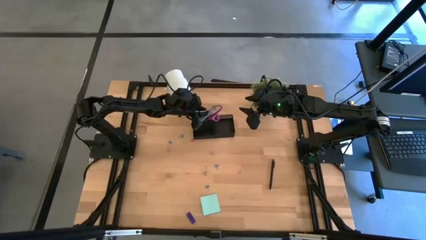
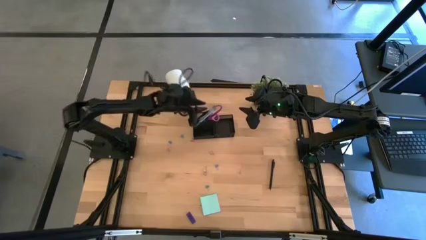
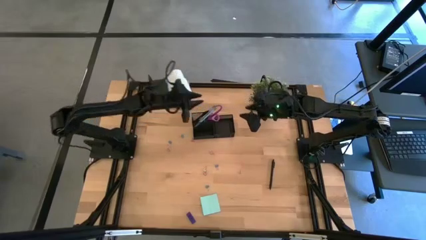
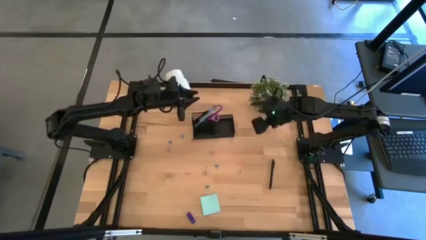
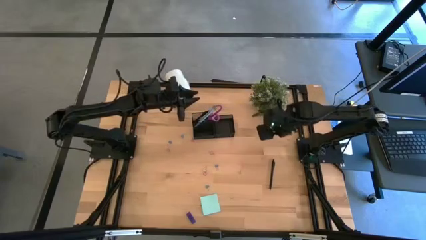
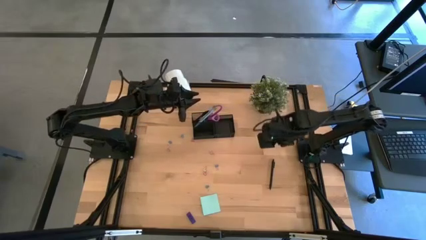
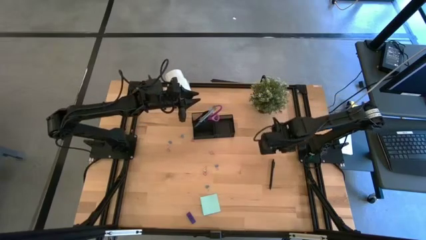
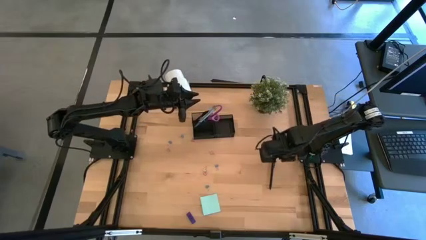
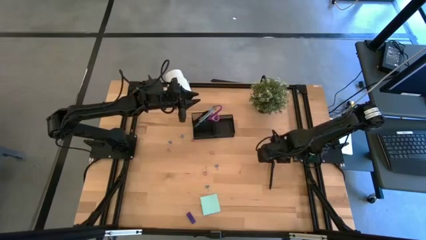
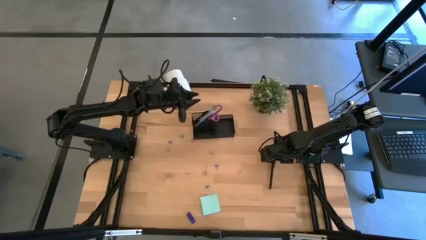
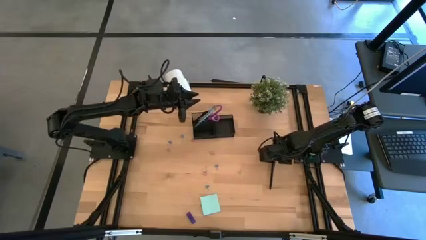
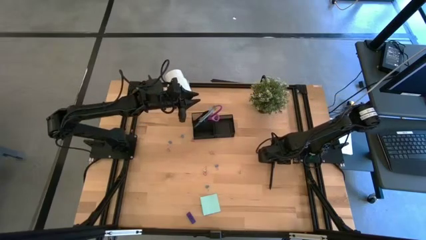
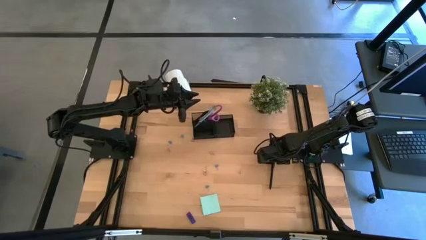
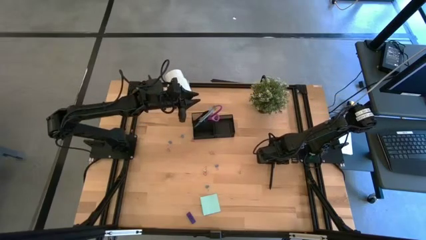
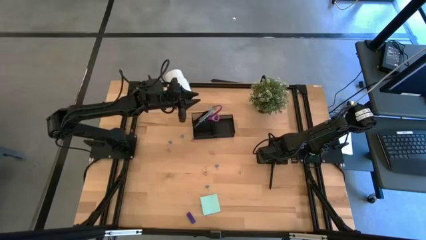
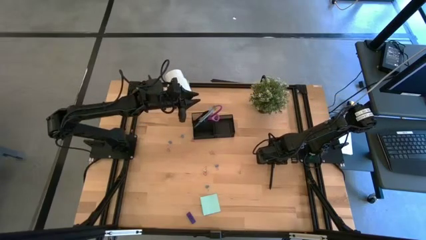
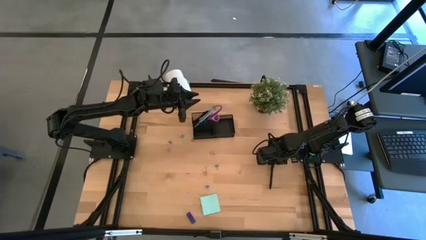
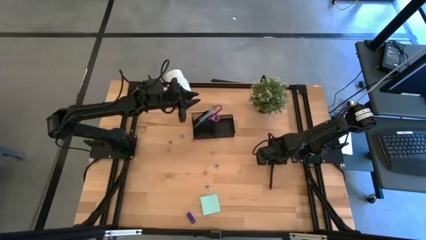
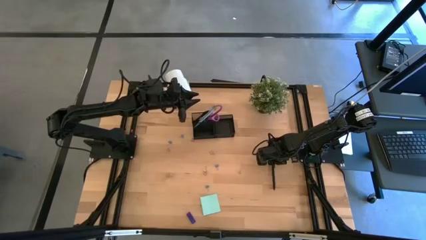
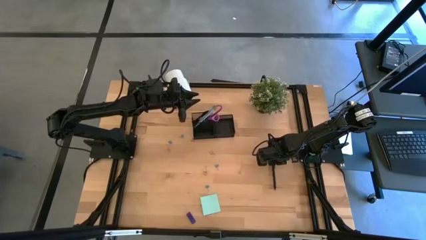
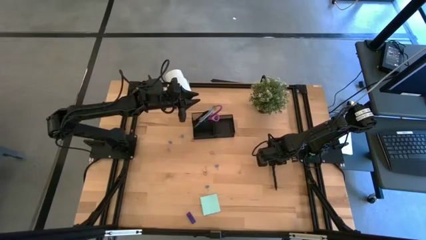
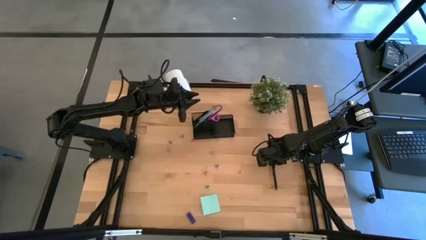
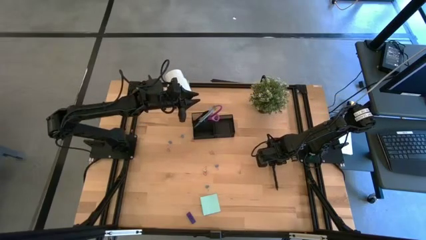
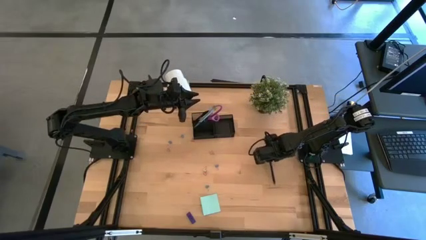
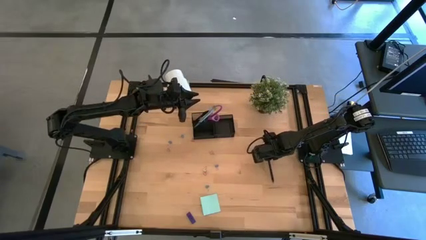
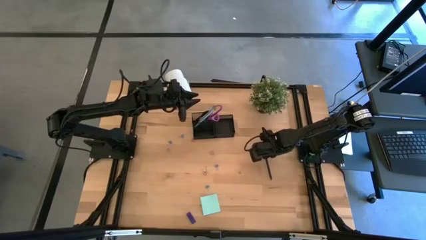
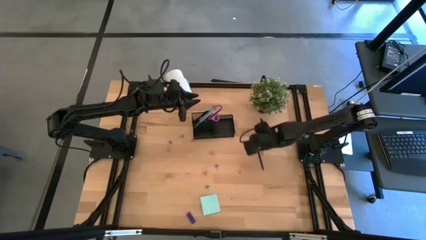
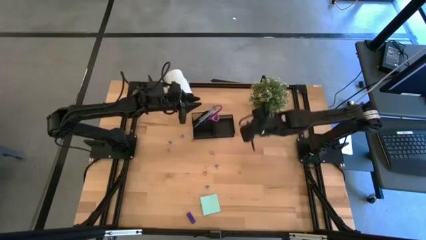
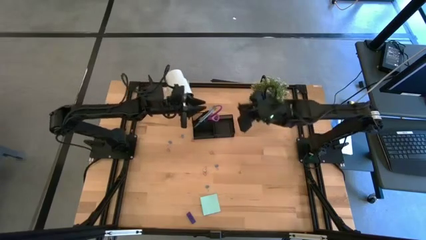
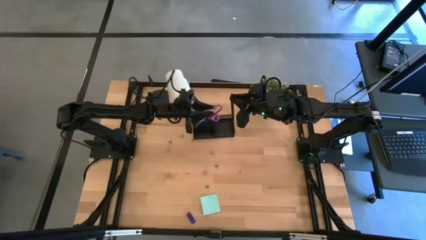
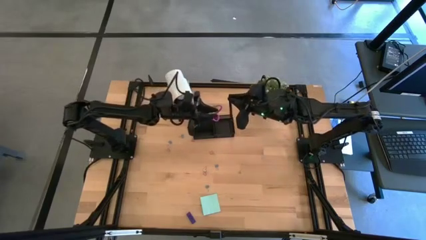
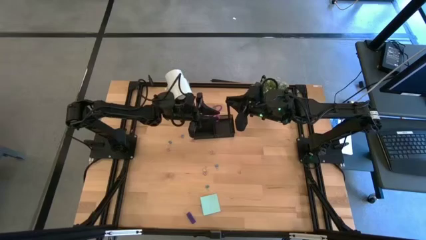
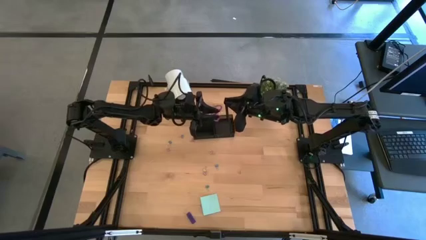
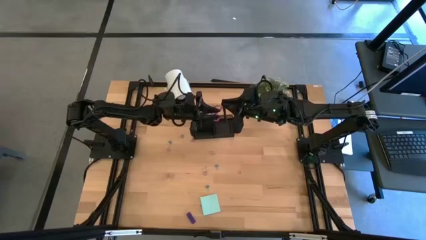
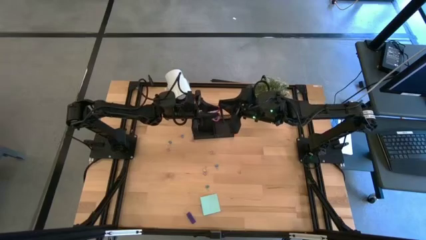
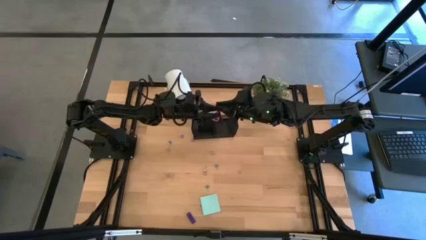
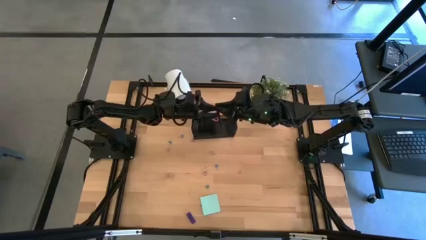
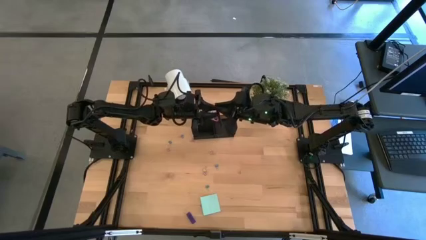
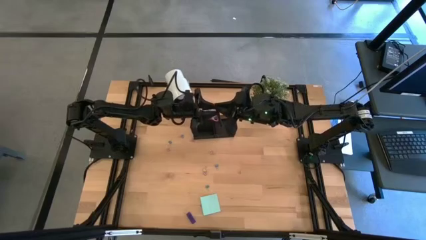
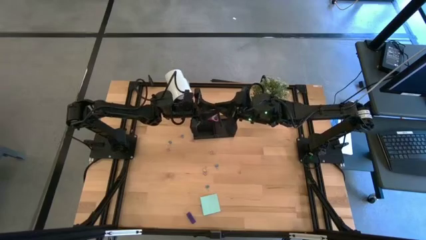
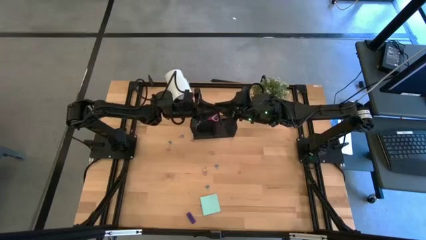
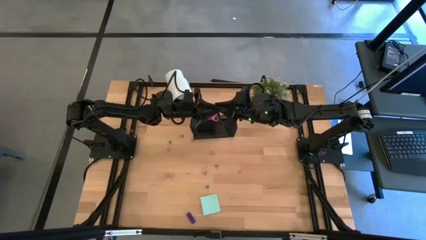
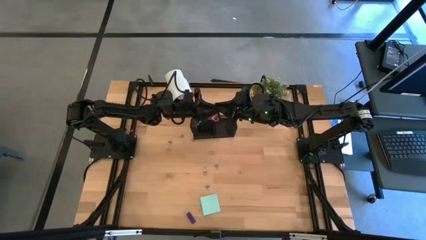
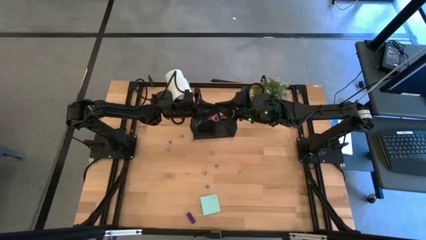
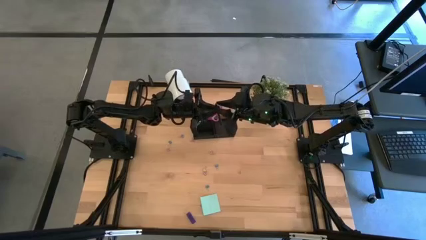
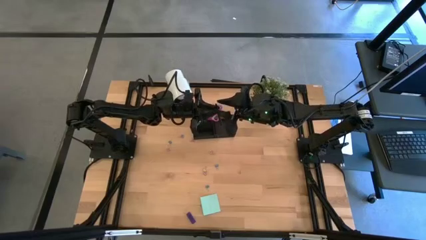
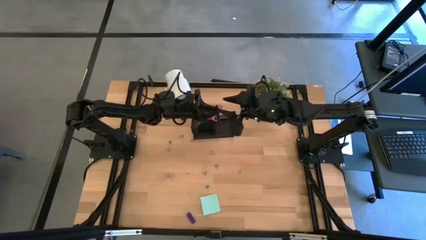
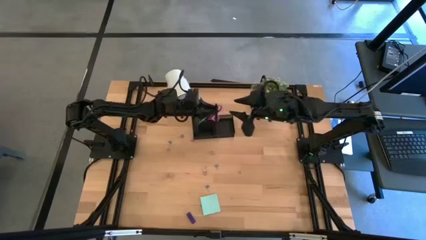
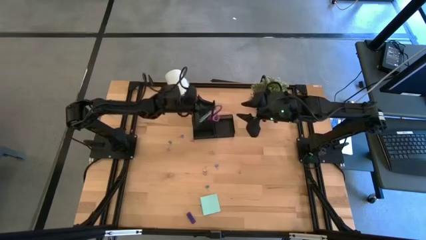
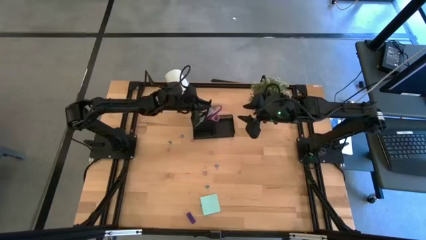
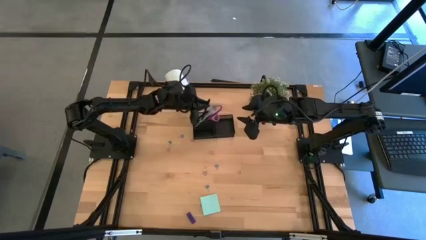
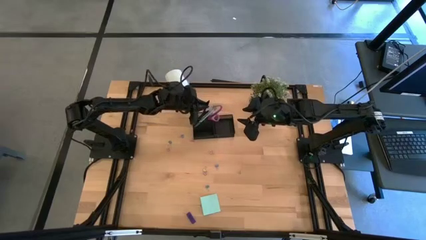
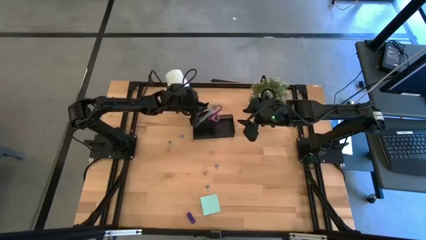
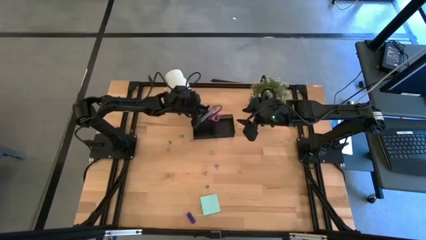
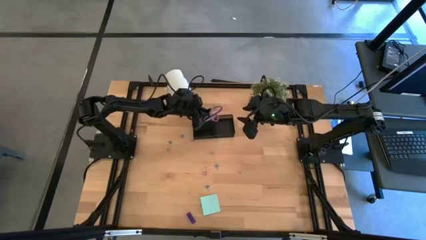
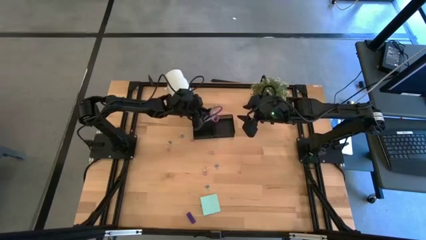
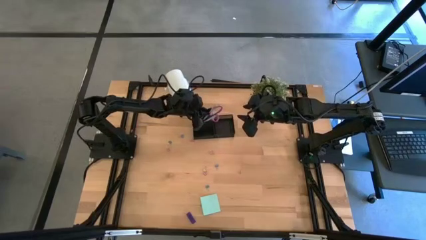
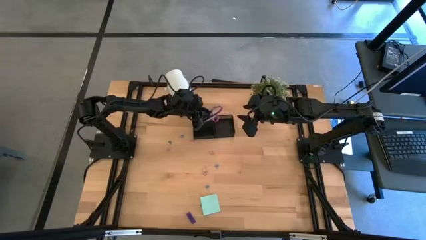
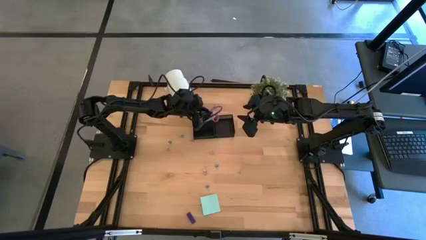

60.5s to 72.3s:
Task: Pick and place office supplies into organizer
Put the black pen into the black desk organizer

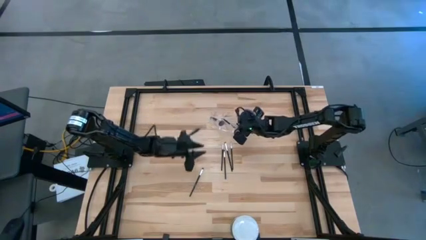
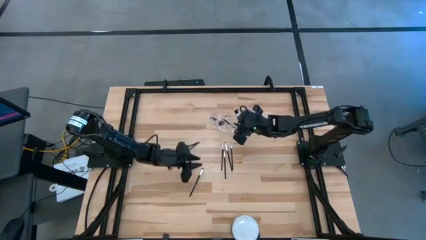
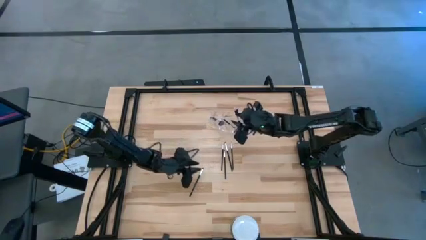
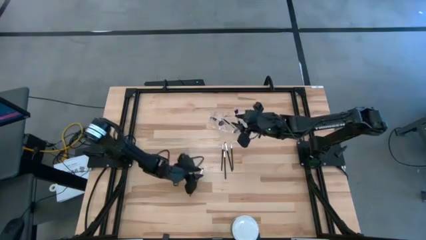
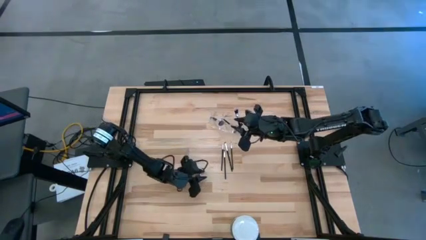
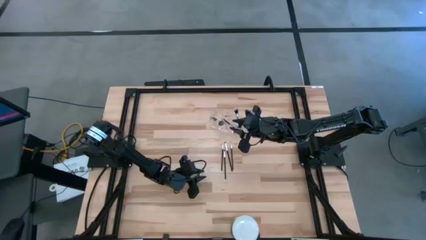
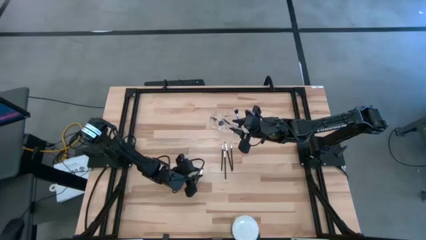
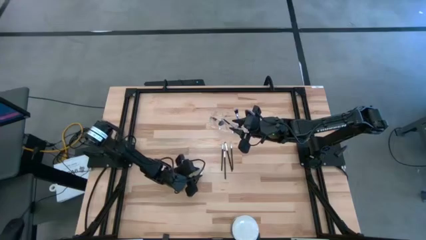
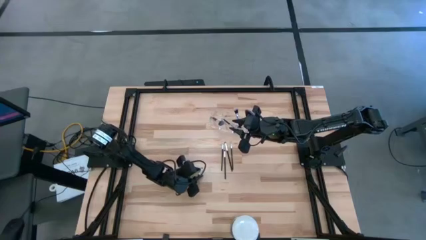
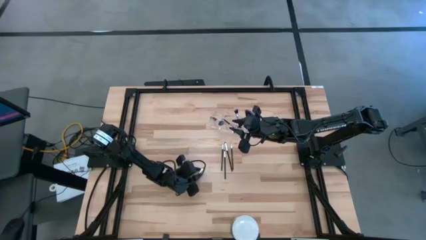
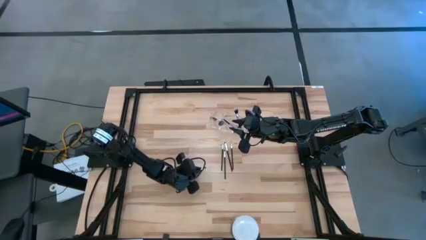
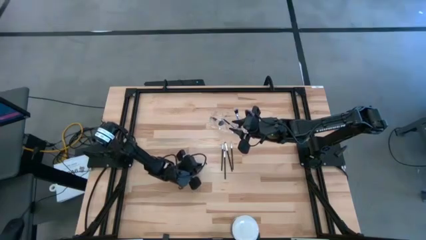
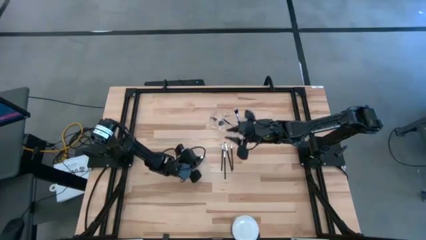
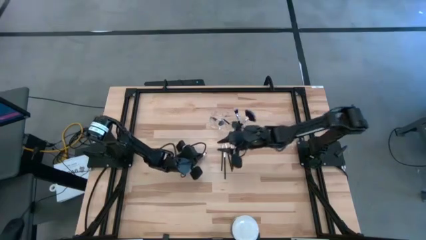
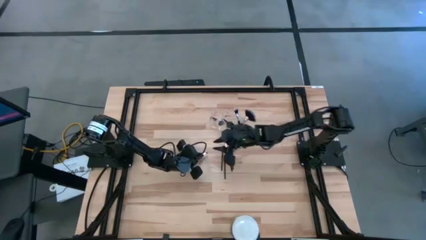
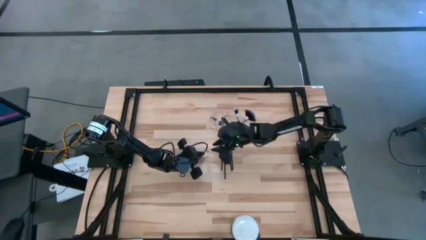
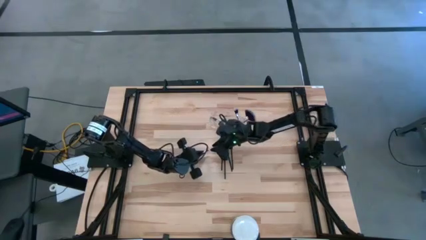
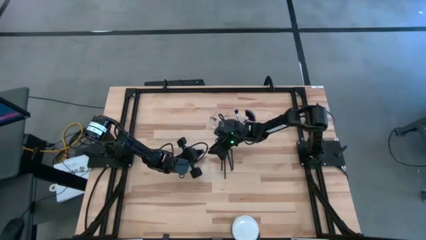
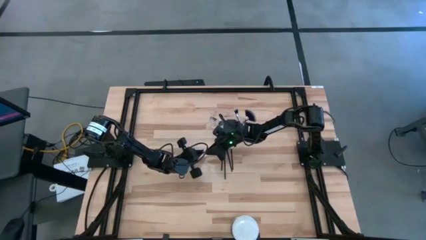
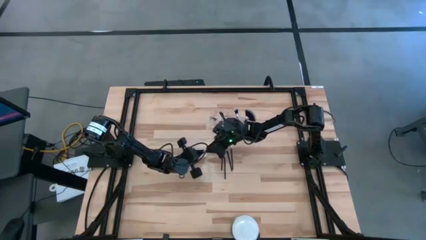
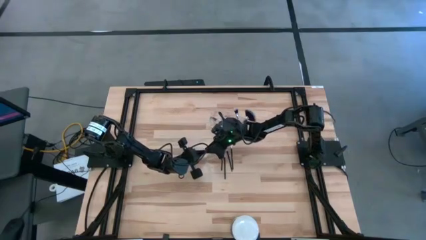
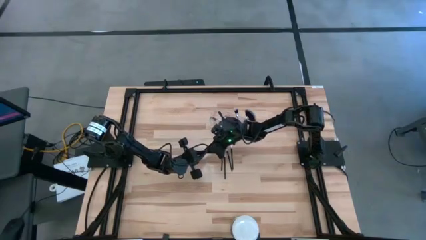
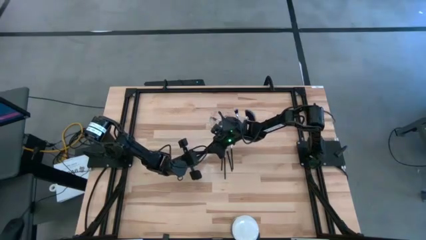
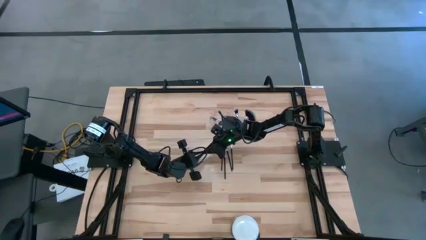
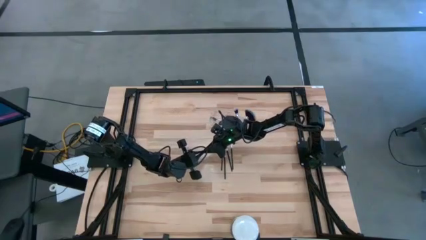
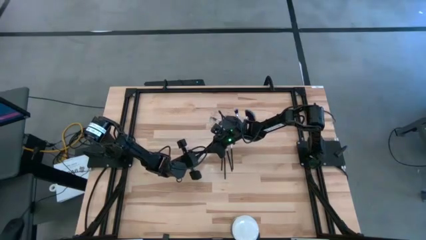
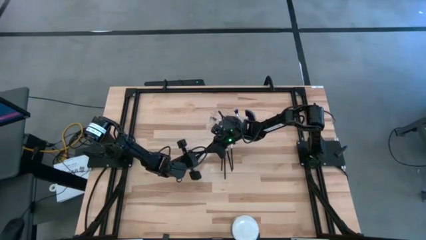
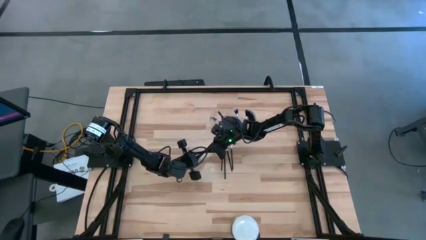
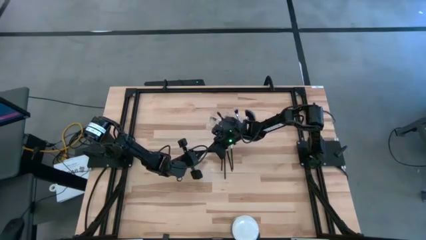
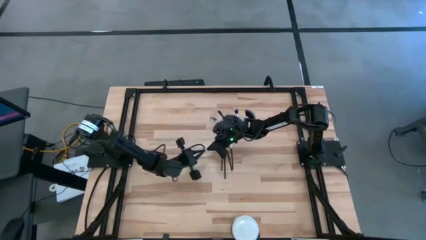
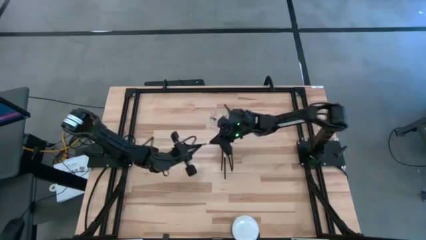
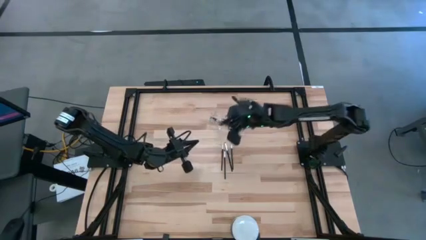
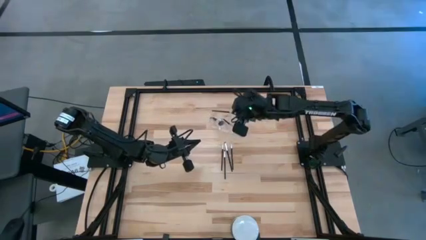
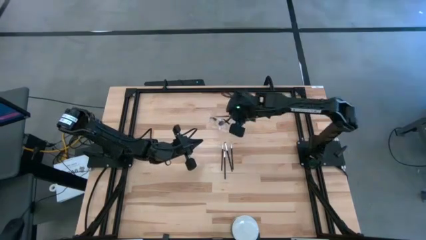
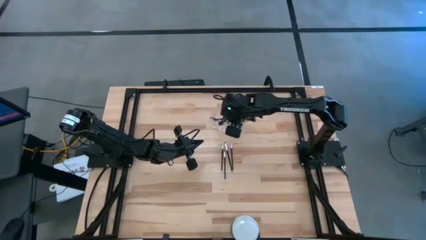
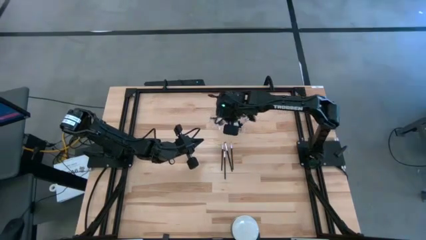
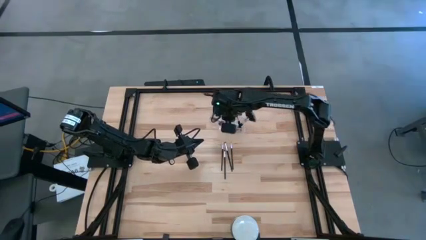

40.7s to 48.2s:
Task: Put items in baskets/containers
Put the black eyeshadow brush into the transparent organizer
